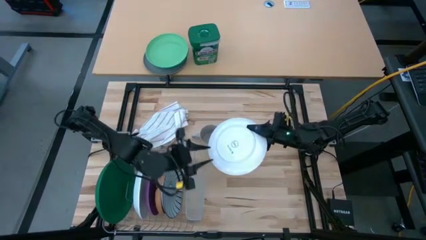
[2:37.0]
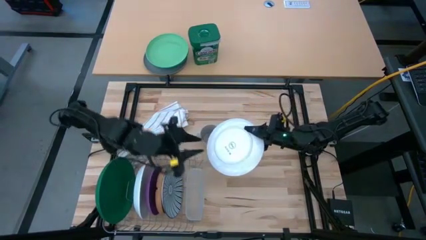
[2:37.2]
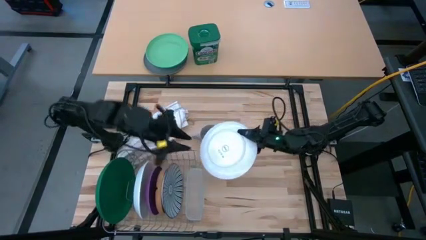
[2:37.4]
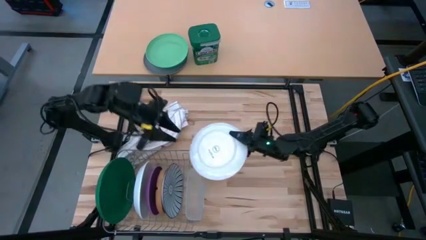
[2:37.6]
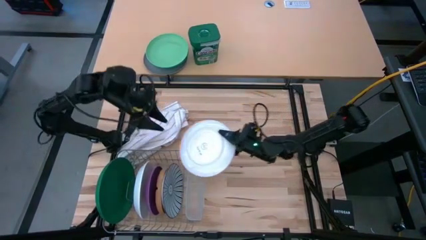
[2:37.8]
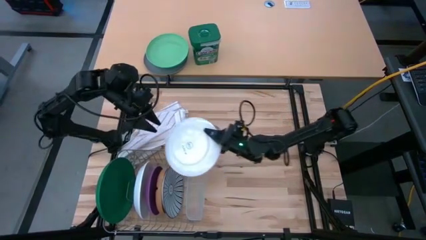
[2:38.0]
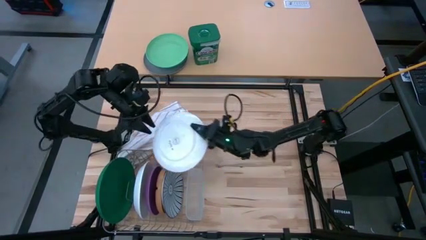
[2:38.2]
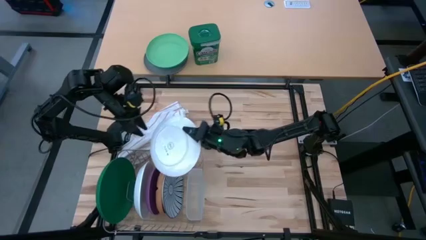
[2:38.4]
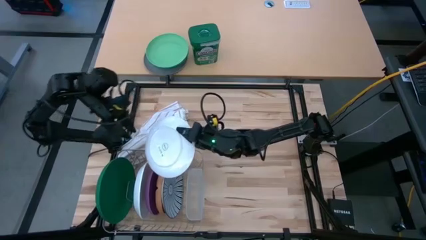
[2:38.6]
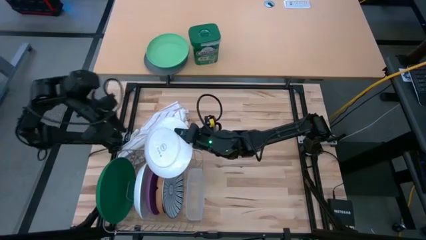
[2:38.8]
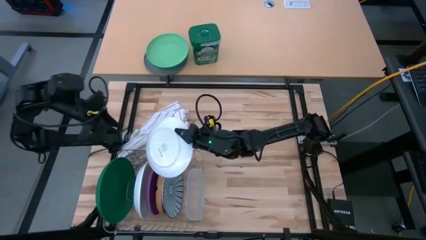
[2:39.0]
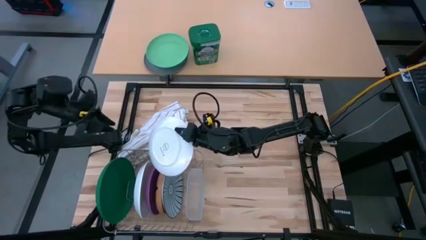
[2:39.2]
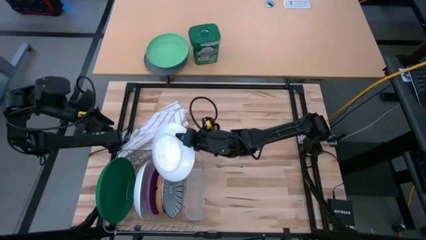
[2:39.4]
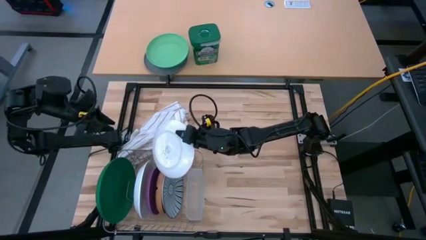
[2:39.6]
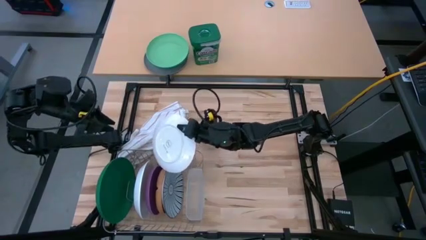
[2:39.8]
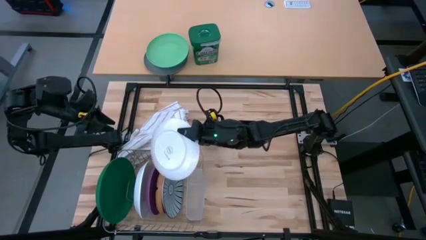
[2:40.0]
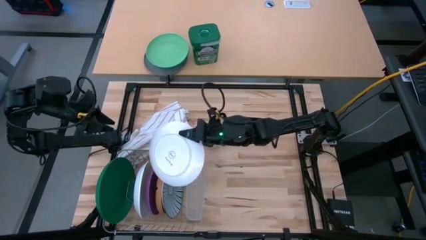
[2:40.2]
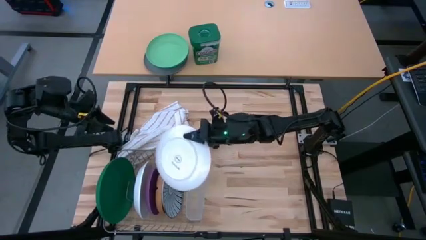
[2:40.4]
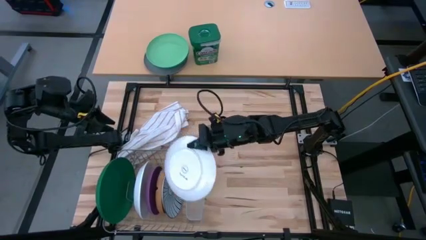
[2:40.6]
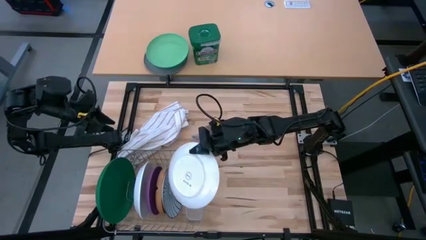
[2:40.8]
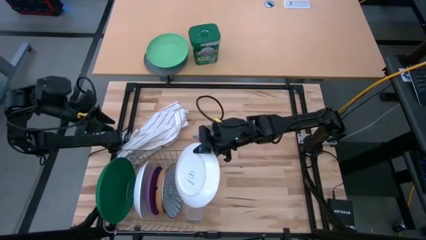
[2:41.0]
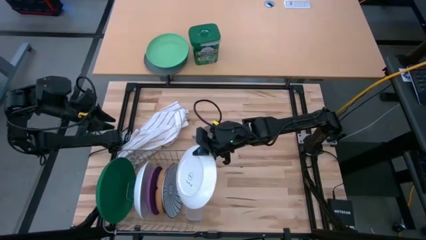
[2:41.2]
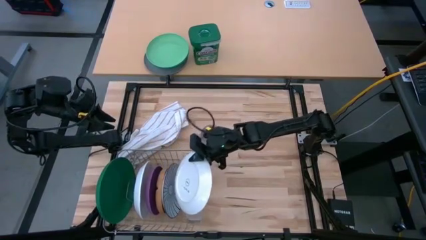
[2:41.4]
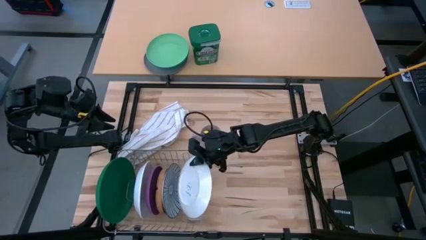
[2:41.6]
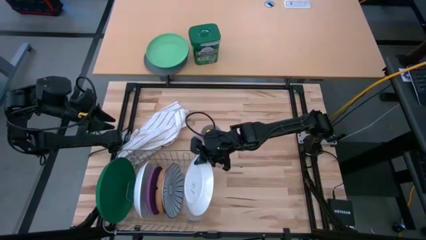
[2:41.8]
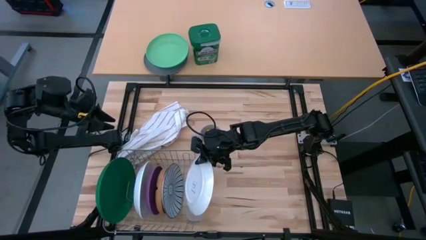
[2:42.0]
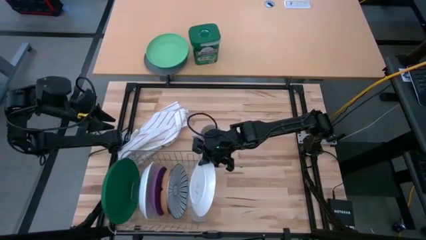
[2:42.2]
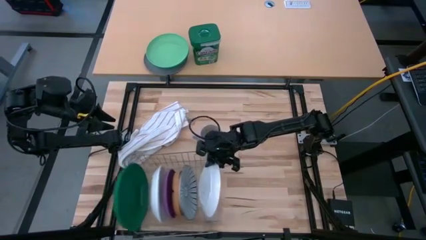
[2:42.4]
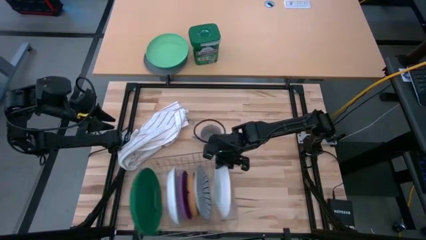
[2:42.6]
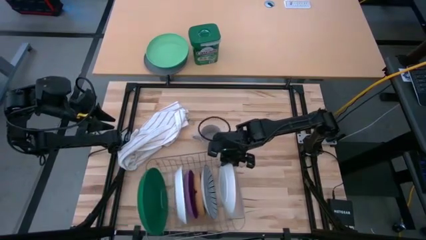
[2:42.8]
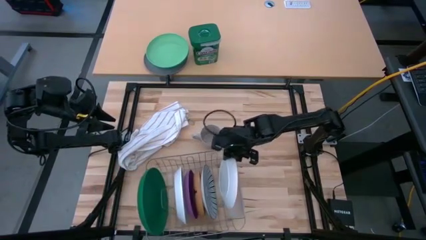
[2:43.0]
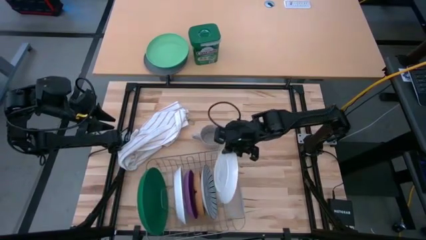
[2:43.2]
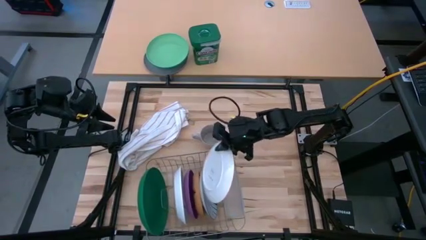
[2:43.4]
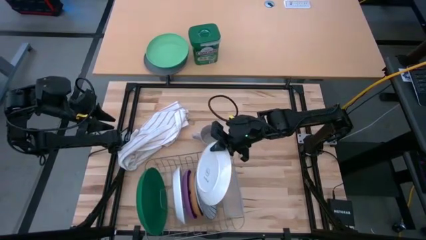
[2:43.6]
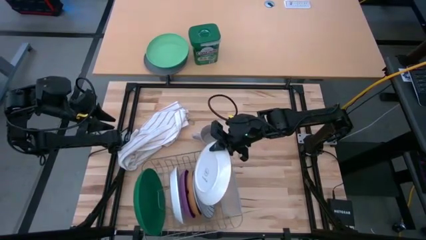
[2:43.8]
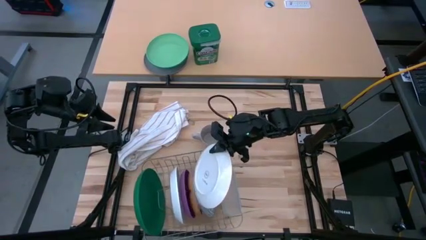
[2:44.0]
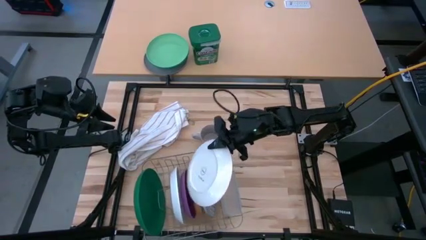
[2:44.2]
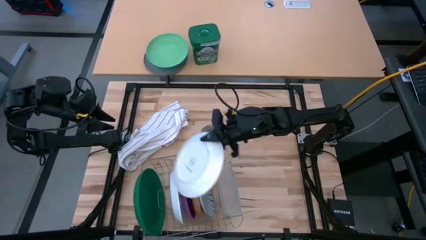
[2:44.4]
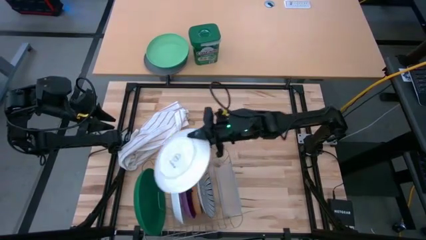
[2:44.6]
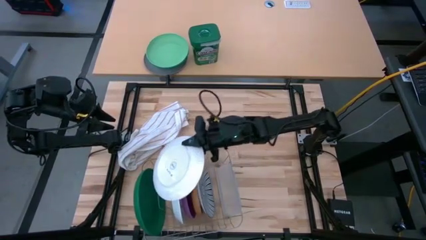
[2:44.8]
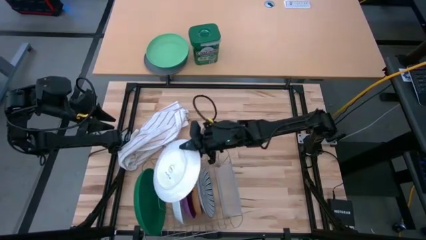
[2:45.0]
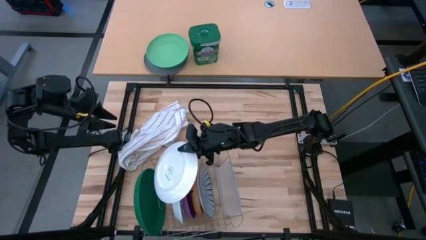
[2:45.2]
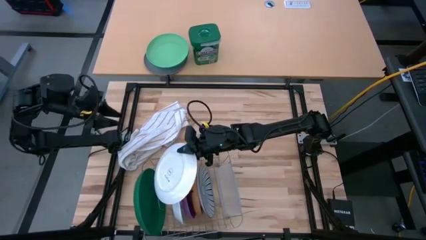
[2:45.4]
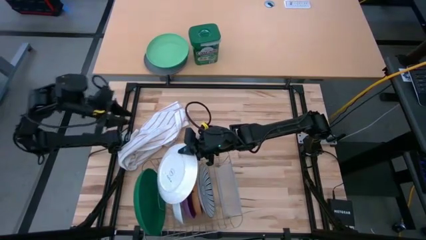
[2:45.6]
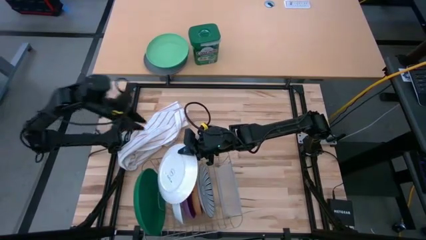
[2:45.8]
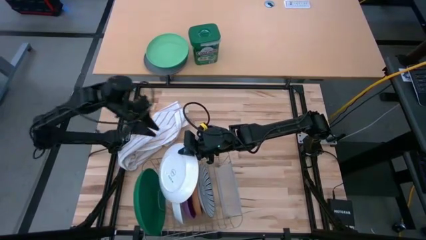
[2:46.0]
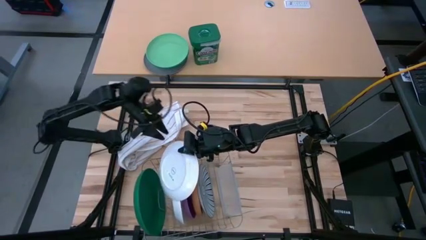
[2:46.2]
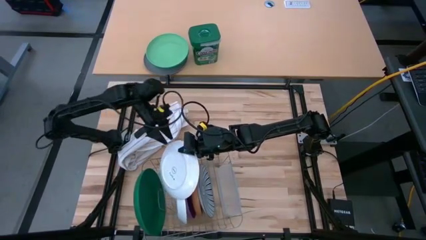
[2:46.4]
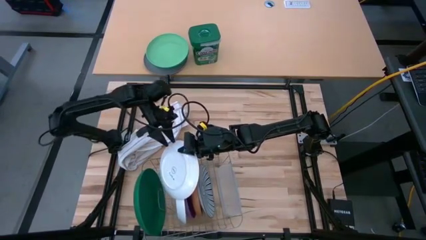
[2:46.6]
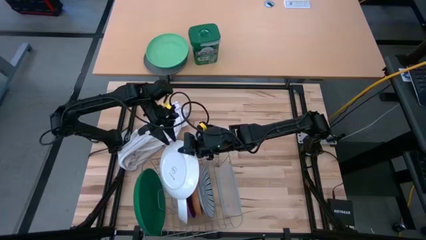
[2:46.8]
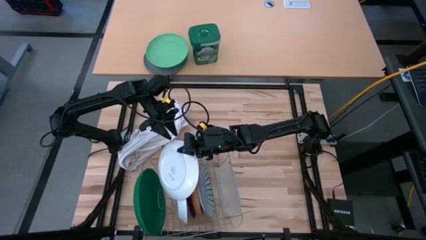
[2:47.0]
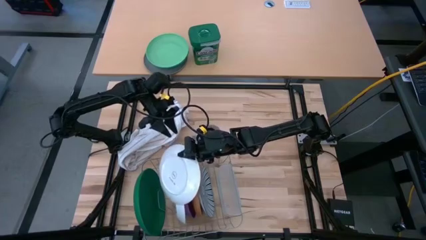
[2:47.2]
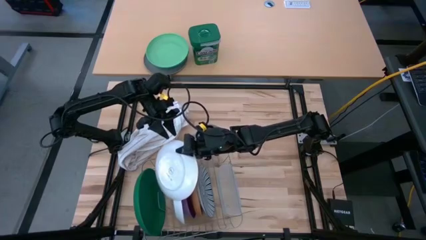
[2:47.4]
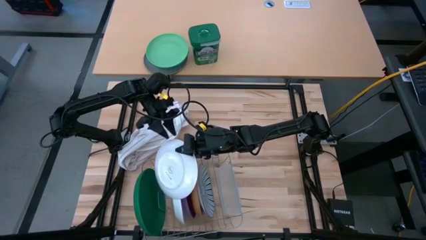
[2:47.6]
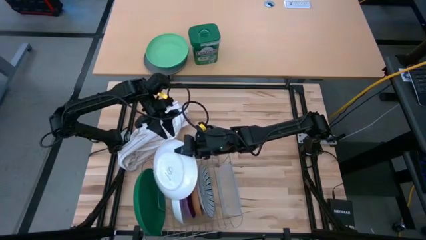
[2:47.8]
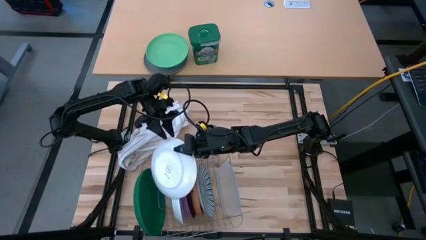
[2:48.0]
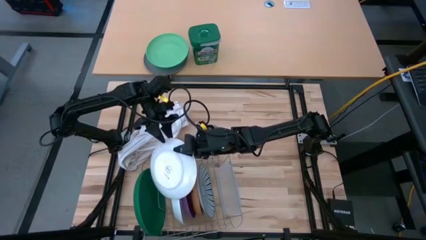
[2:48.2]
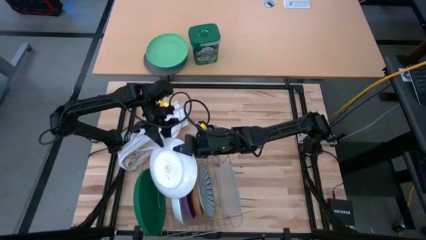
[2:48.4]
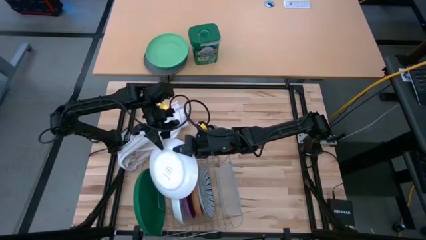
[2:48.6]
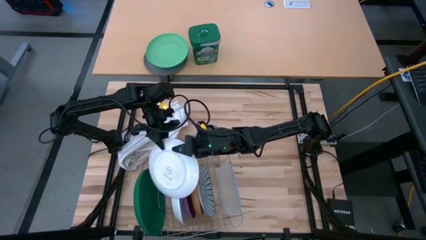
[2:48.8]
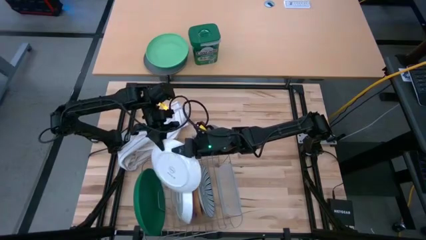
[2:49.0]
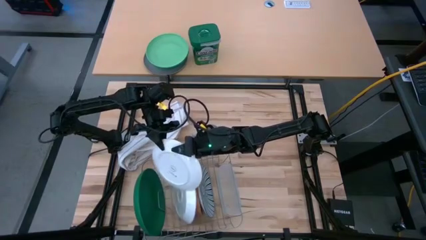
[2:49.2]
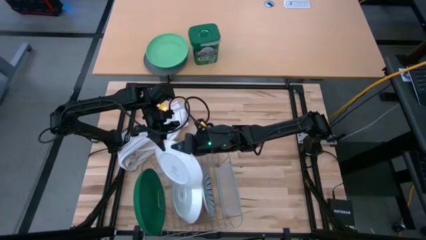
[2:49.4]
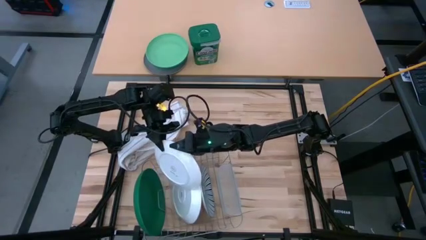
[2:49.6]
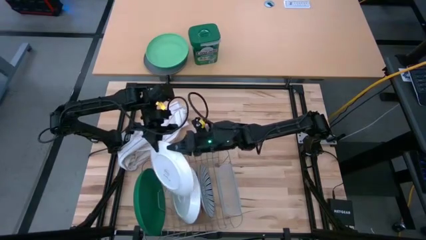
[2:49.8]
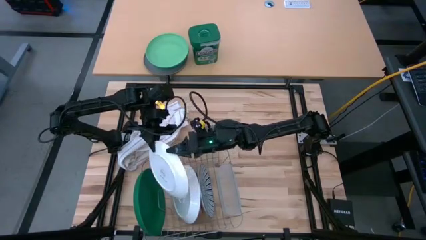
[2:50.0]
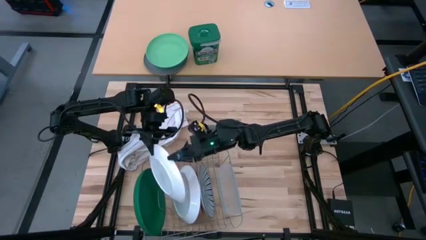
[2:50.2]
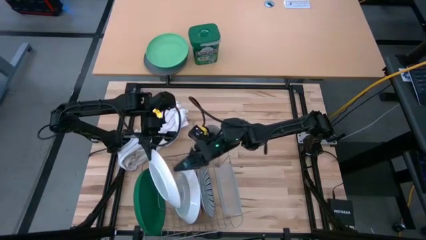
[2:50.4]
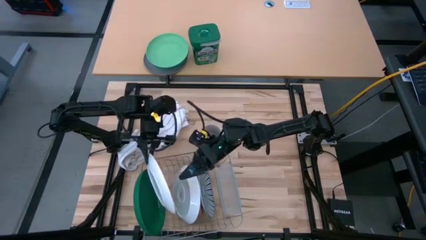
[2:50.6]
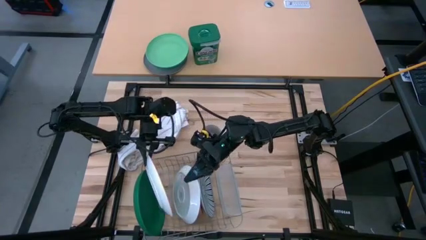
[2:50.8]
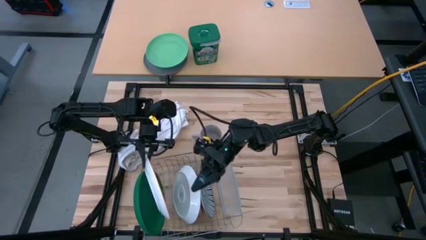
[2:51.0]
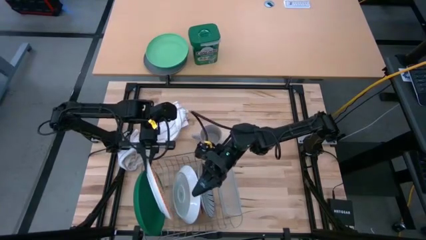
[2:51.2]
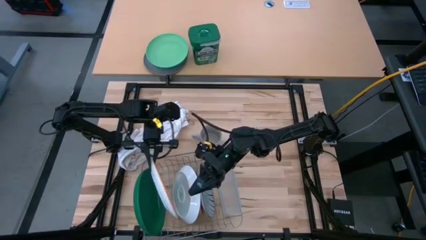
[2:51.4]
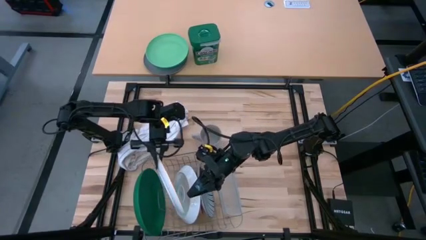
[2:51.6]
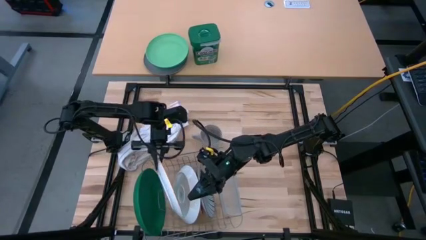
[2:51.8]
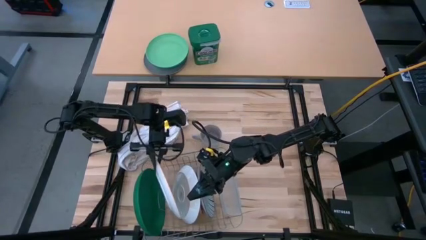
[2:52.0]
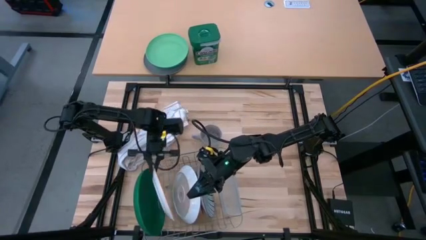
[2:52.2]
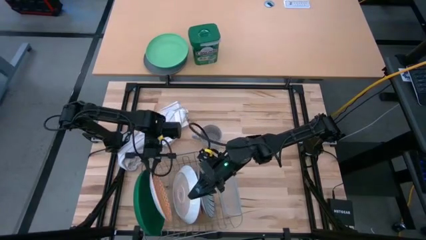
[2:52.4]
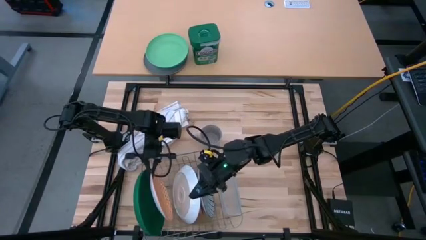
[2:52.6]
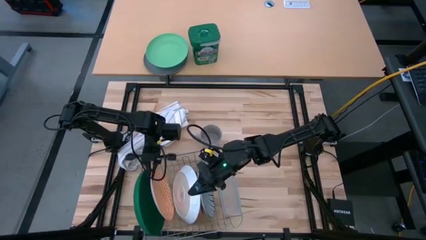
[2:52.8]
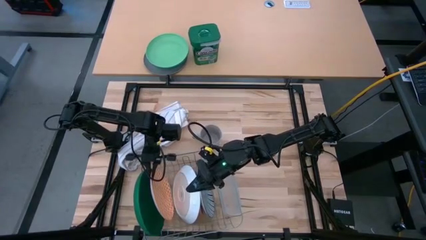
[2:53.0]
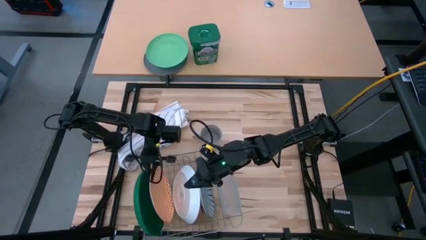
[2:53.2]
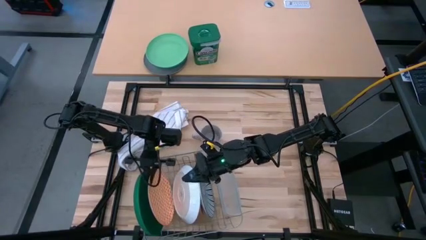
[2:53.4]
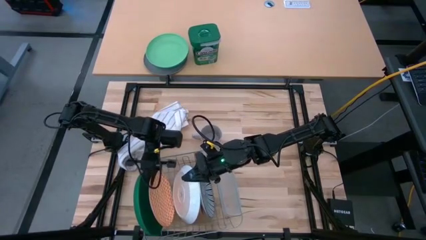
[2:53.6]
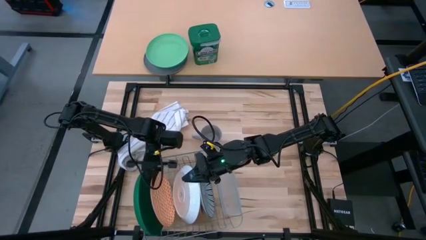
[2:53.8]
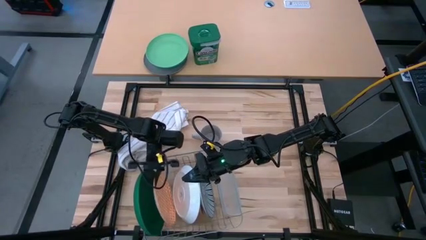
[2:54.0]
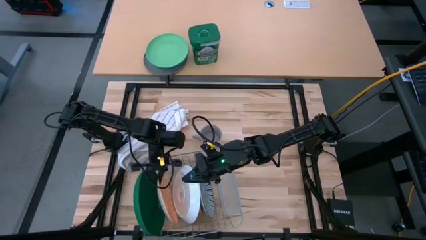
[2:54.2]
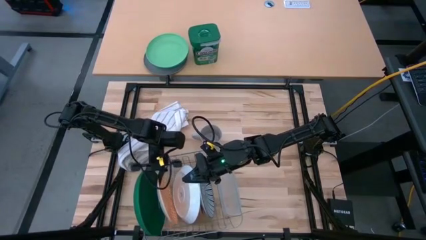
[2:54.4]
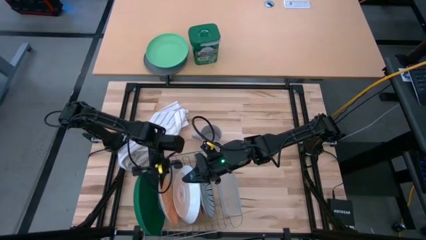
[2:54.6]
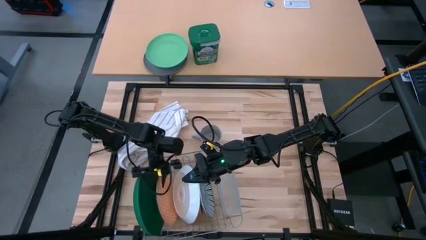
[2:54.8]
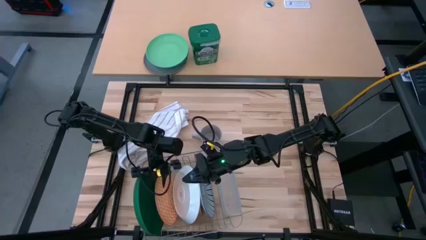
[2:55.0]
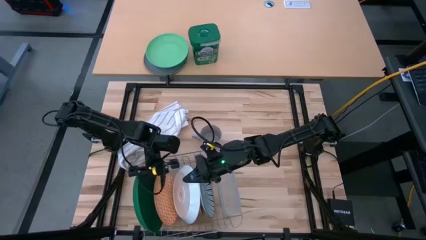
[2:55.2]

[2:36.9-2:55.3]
Task: Sort dishes
Put the orange patterned plate into the dish rack
